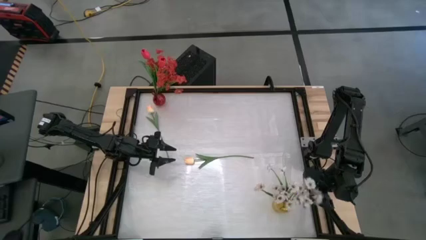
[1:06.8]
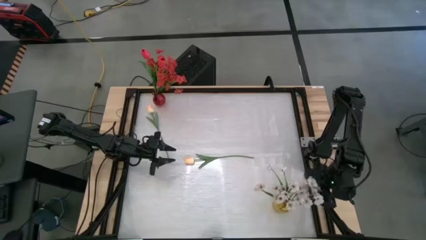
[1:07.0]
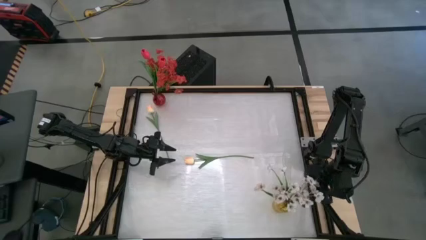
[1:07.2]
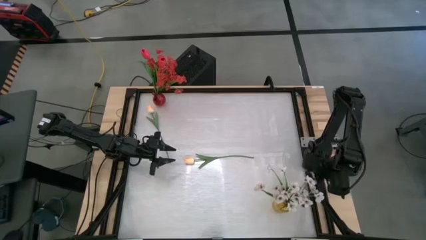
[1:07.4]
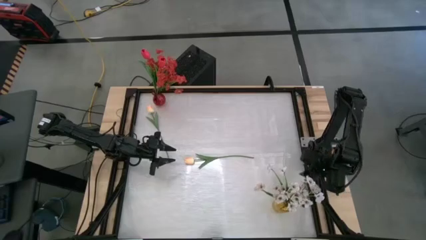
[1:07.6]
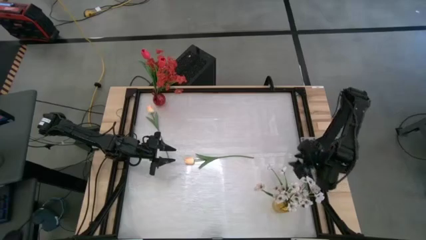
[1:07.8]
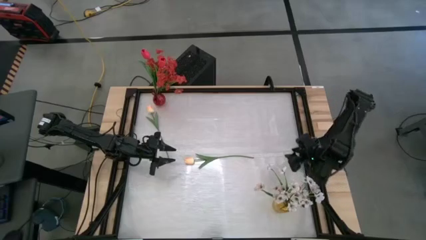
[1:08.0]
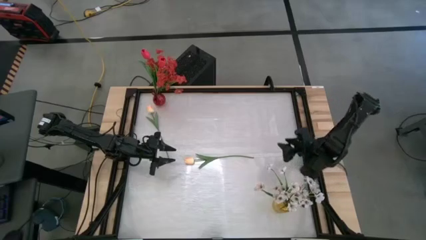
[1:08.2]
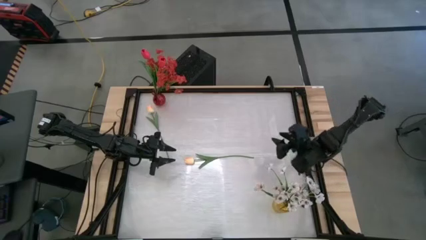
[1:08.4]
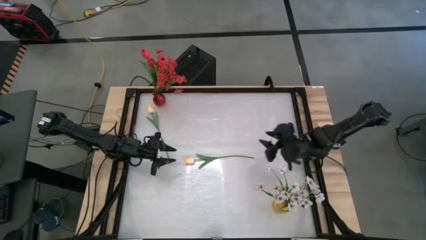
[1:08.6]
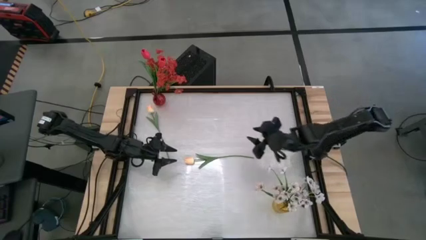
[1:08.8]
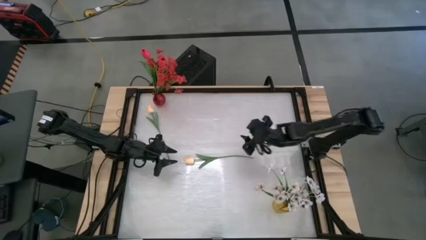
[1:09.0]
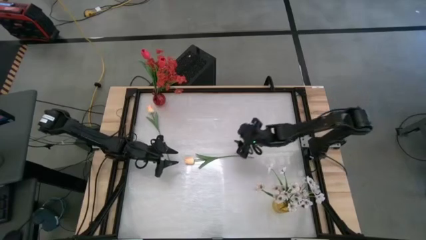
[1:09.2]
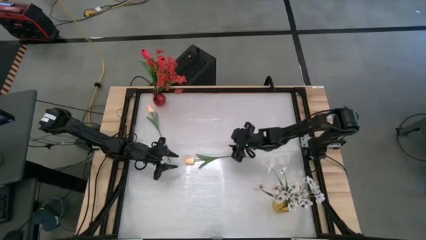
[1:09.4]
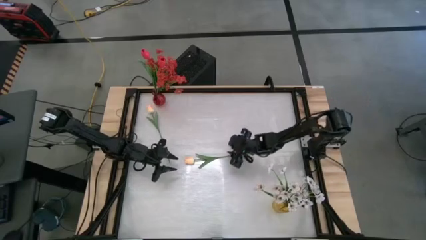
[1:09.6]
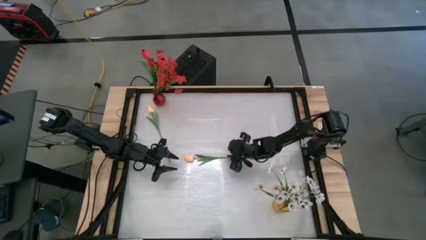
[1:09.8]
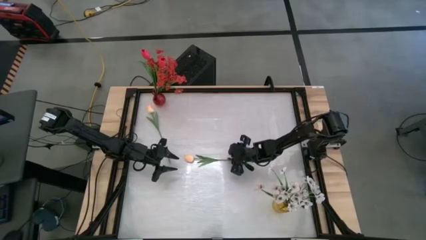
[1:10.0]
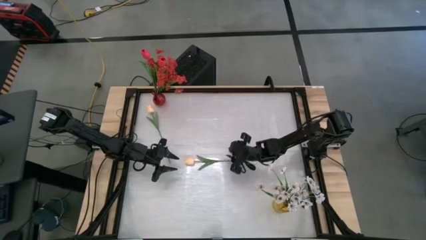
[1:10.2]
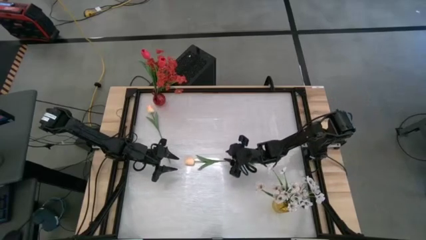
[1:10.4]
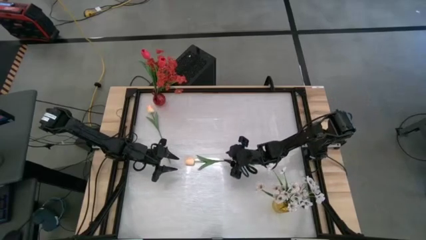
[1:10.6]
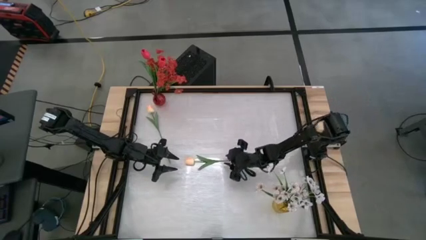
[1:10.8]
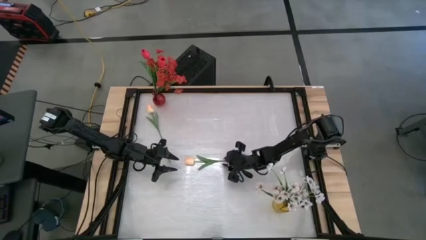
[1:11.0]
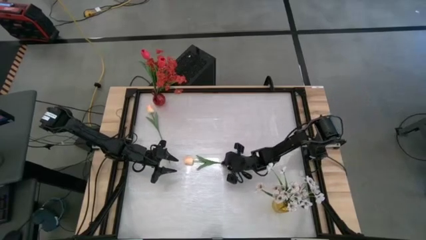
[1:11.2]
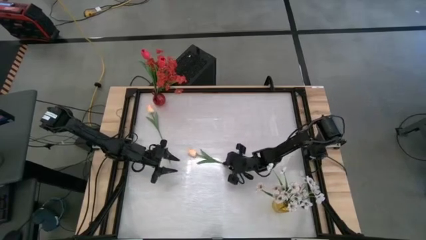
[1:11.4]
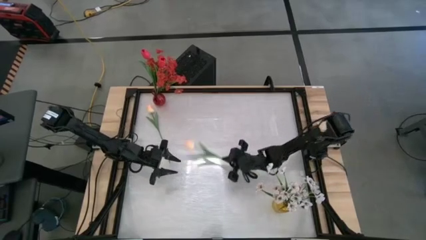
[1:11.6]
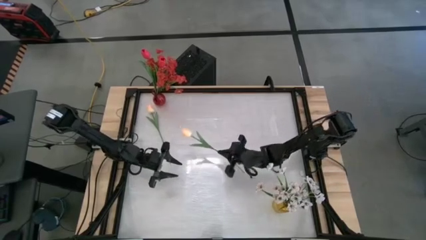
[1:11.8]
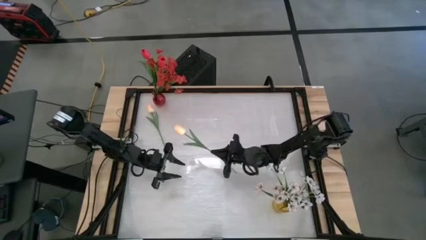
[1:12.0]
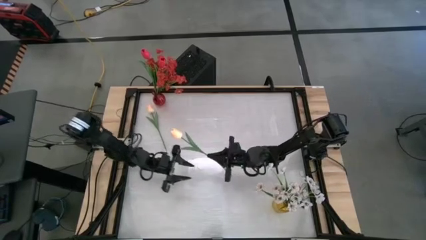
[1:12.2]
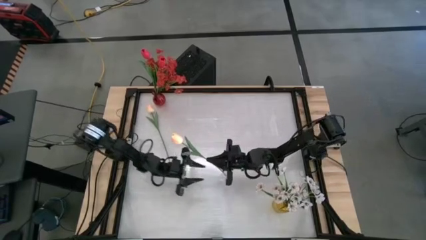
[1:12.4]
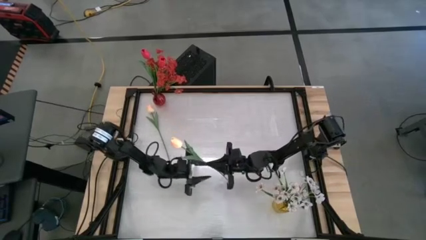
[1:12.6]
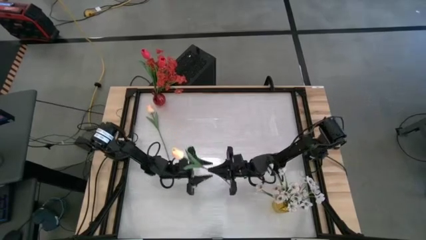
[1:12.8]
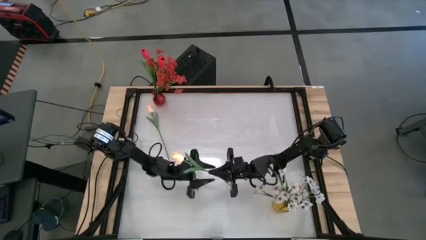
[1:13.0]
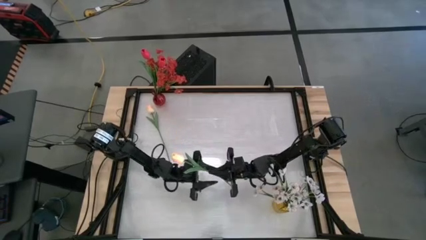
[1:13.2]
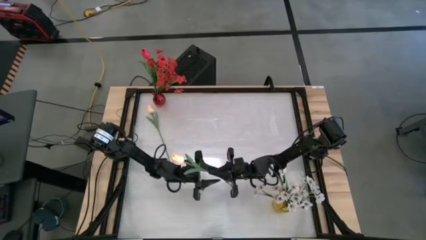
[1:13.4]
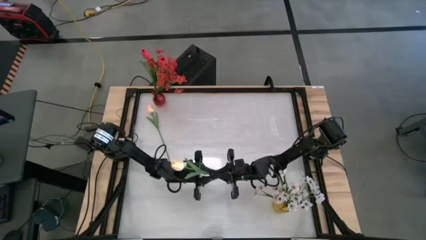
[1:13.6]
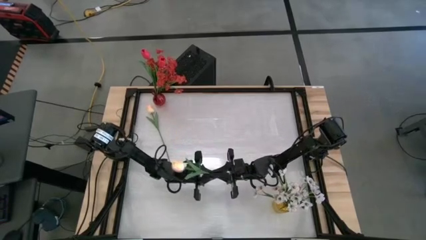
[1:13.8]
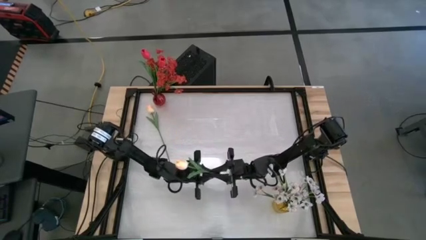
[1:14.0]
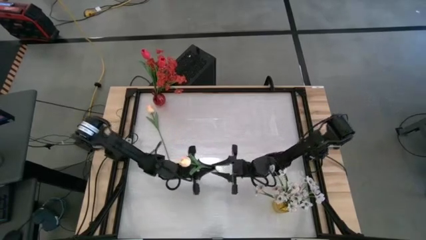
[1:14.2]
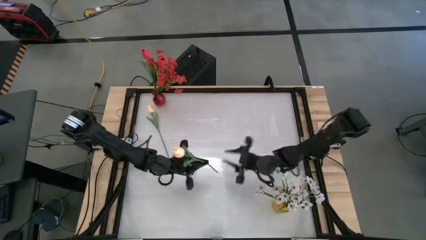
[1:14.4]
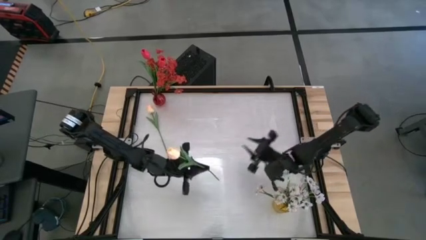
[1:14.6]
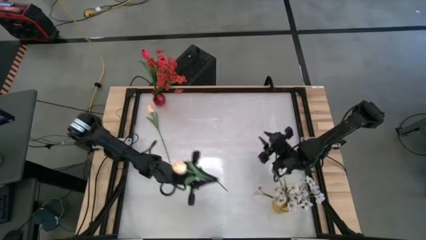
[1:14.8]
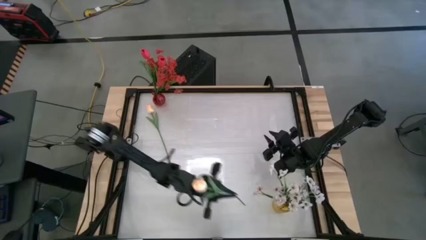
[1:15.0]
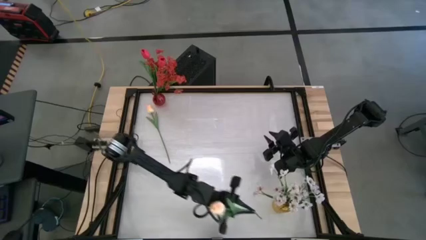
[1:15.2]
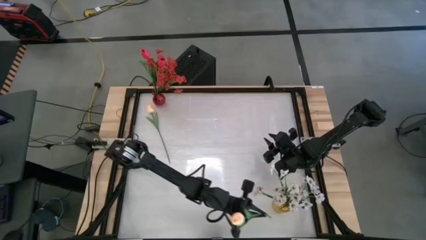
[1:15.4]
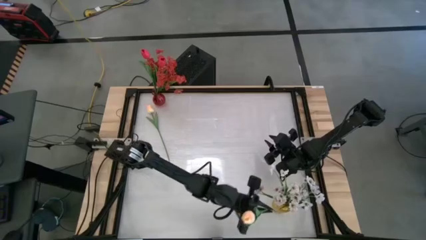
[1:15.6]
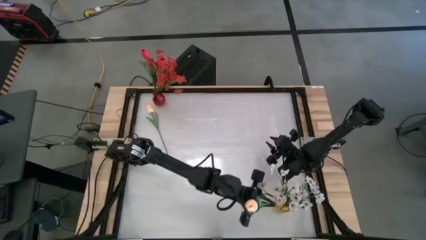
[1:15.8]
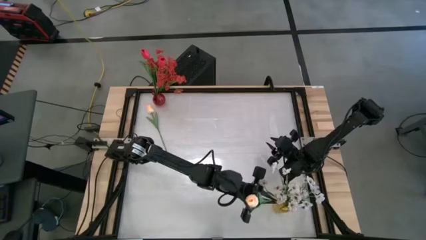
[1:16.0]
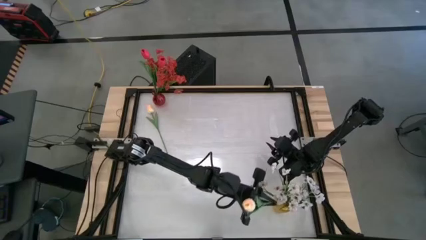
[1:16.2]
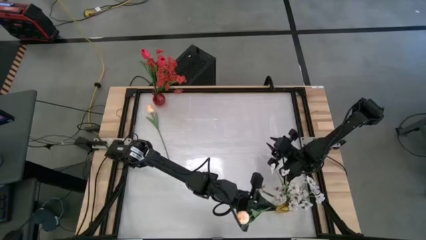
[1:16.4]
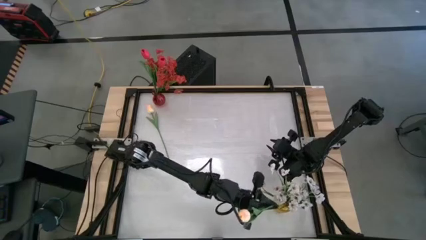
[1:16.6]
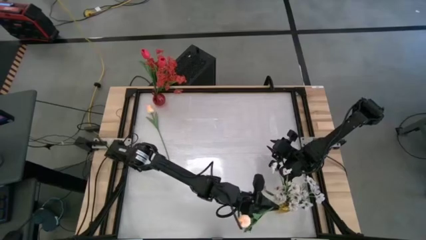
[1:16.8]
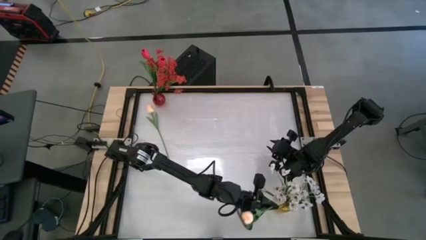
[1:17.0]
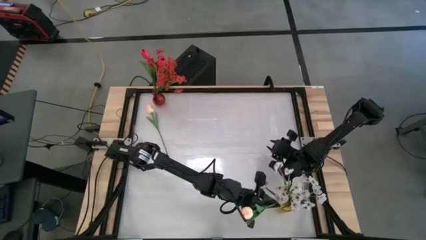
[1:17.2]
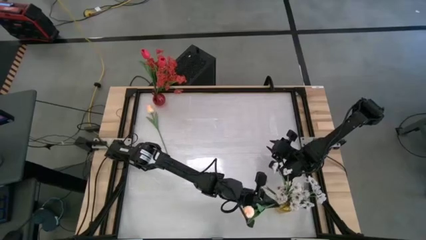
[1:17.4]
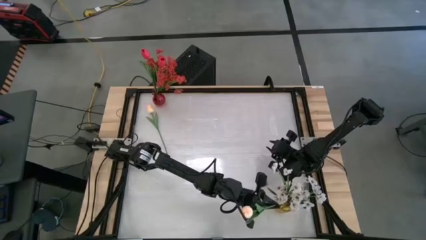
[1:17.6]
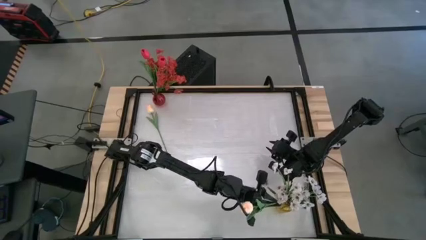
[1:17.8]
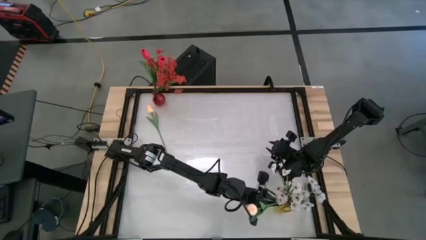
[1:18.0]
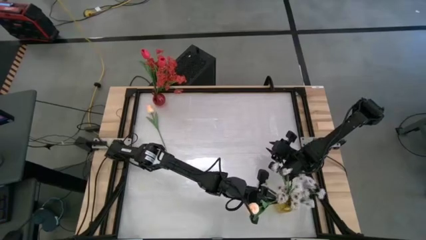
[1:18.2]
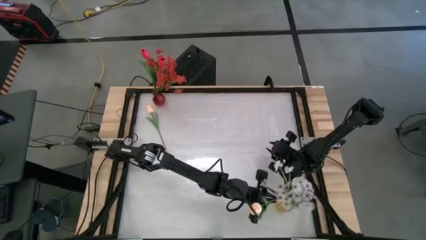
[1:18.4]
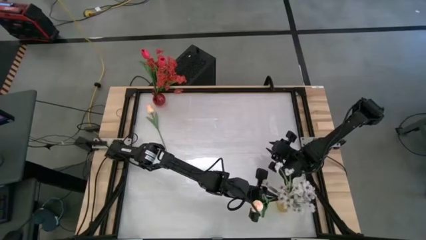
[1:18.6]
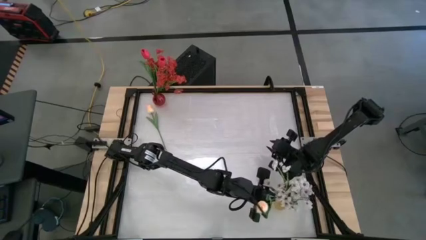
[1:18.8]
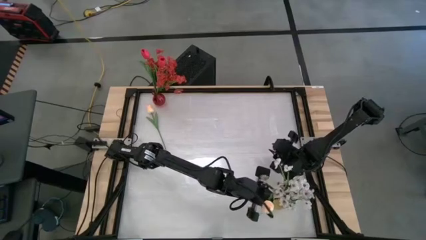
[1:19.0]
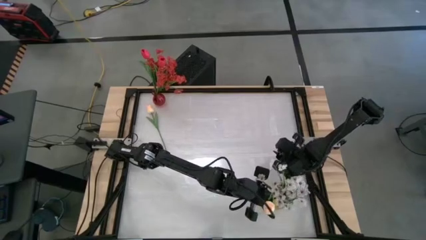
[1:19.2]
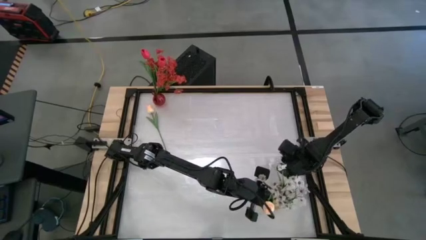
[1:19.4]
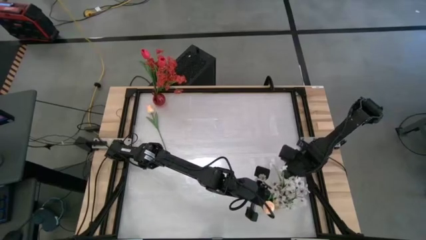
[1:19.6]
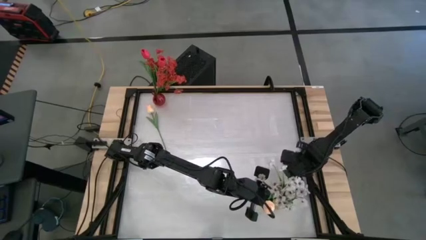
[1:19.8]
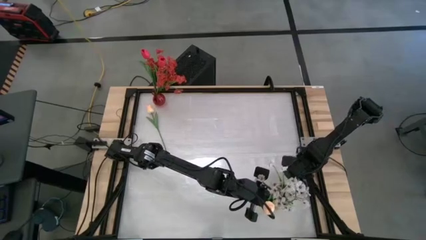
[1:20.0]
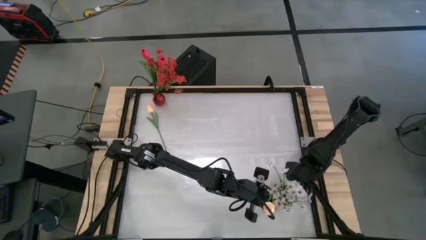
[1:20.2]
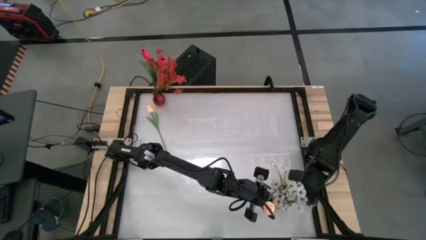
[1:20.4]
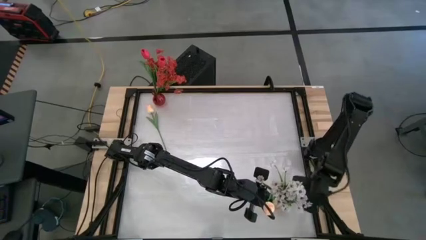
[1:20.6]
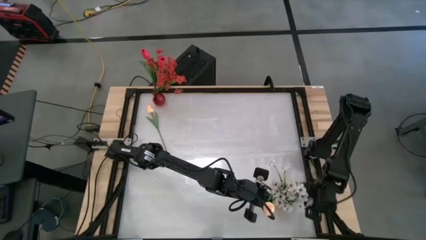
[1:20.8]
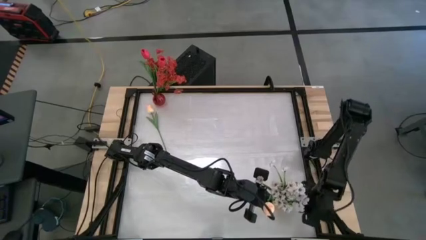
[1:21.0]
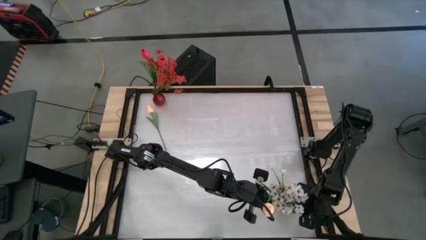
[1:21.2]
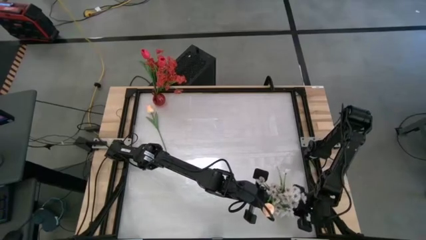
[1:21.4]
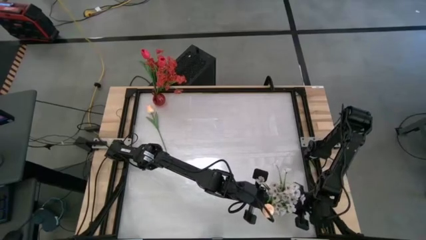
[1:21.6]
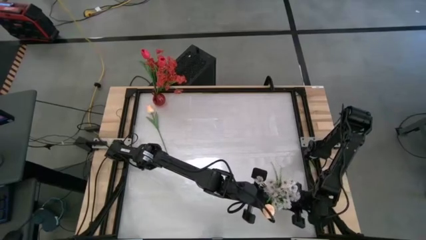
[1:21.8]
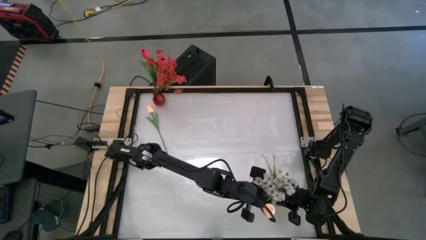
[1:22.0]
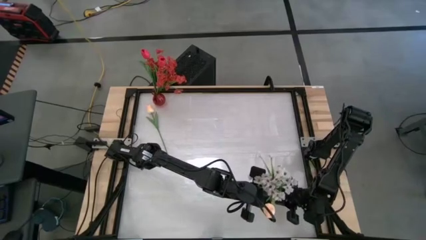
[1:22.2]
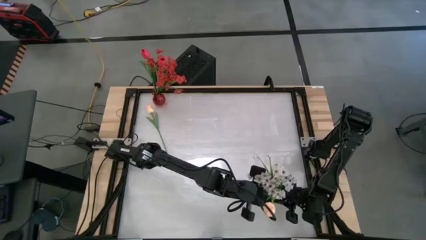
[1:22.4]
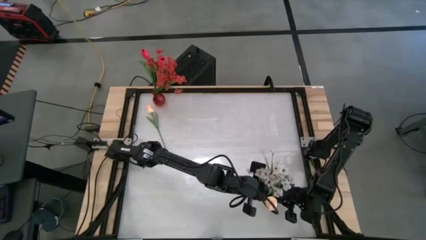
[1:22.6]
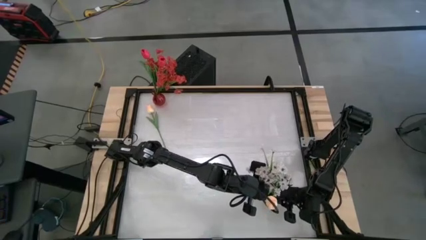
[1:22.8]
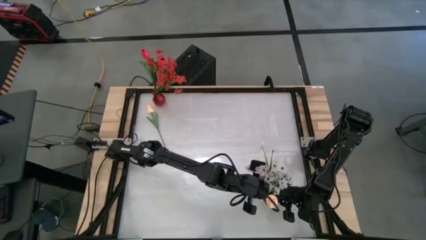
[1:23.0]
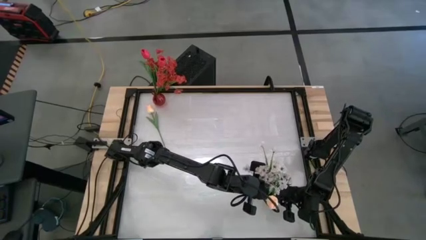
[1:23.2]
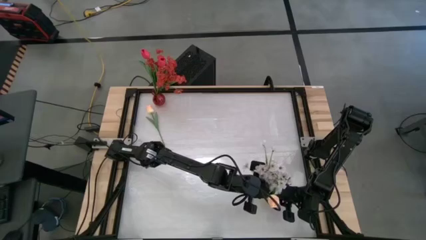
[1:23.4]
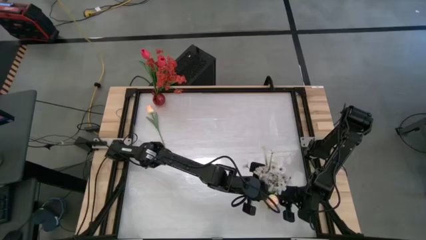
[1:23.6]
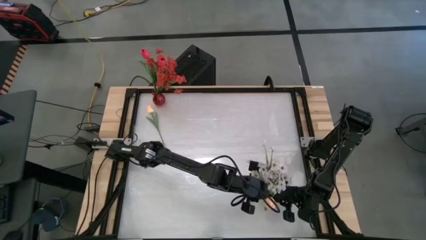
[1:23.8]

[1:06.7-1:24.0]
Task: Sort flowers into vase by color
Put the right white flower into the transparent yellow vase
